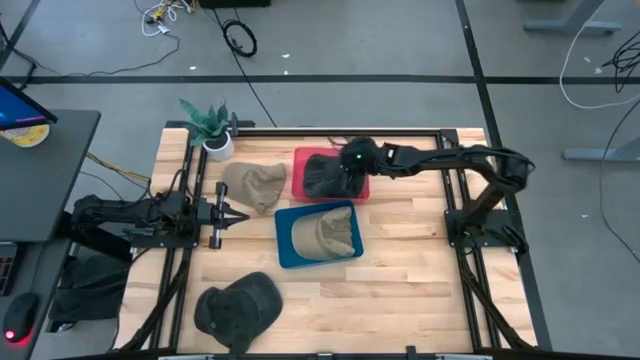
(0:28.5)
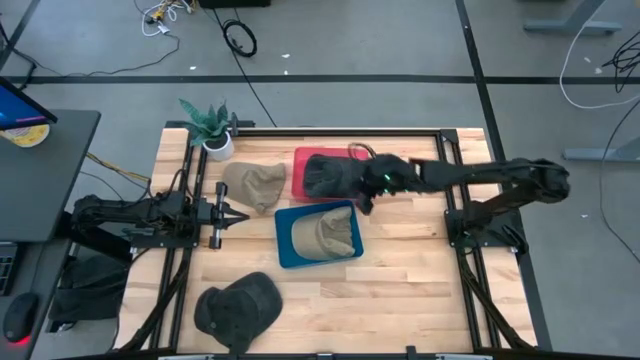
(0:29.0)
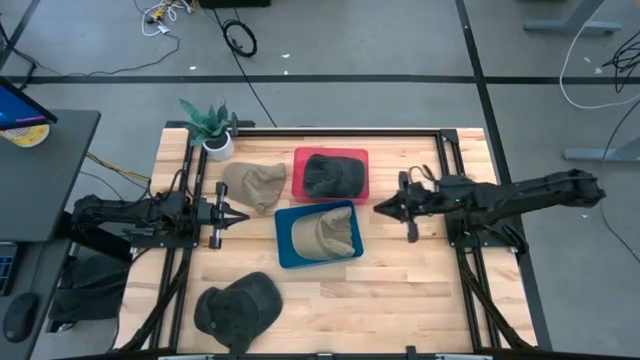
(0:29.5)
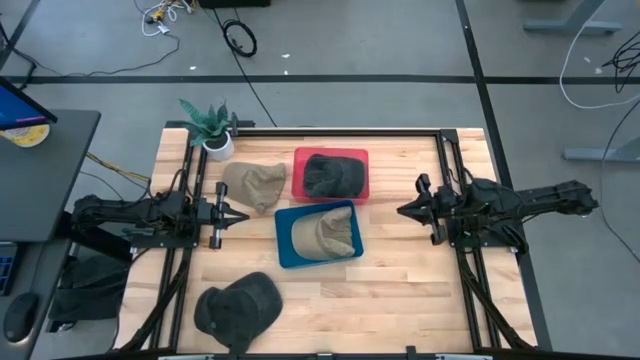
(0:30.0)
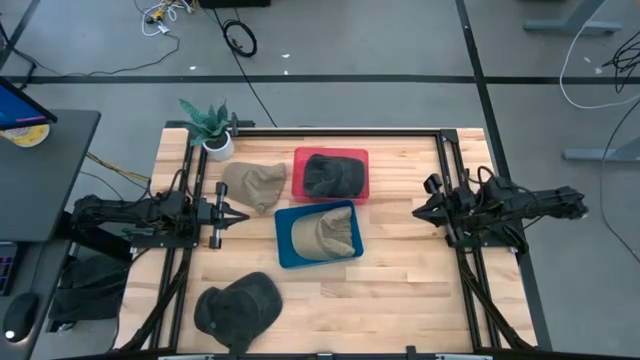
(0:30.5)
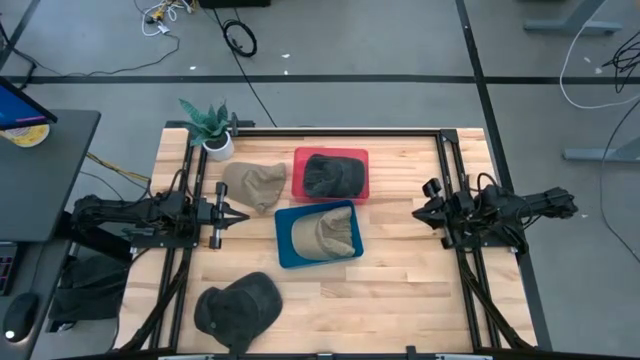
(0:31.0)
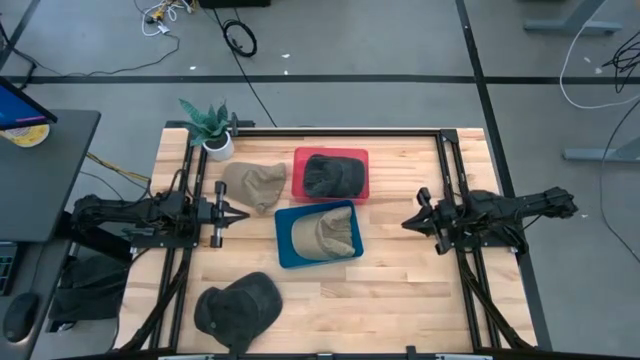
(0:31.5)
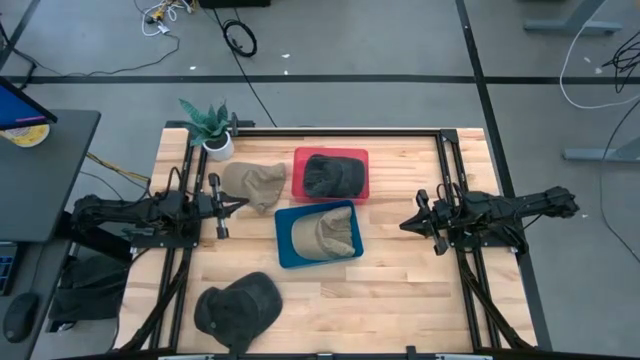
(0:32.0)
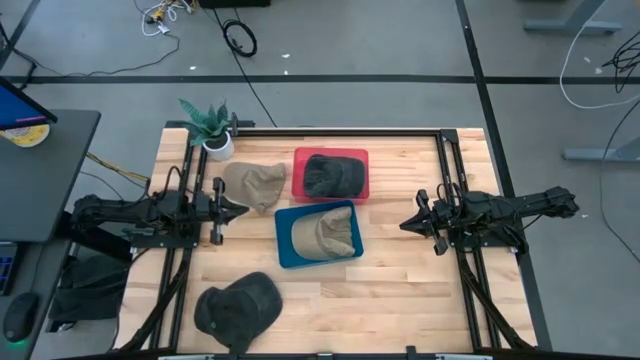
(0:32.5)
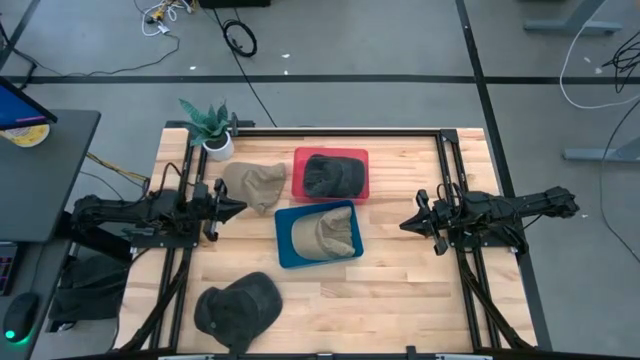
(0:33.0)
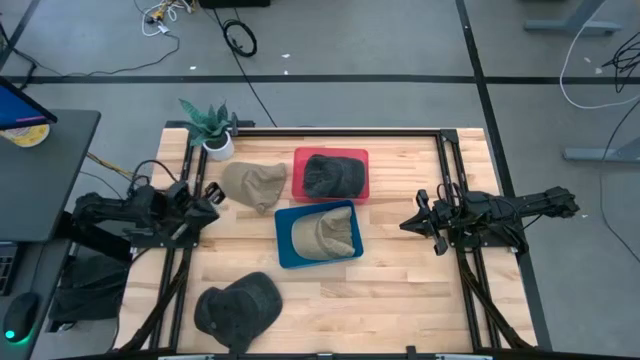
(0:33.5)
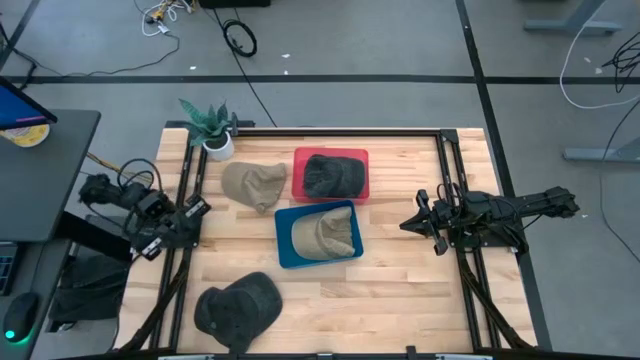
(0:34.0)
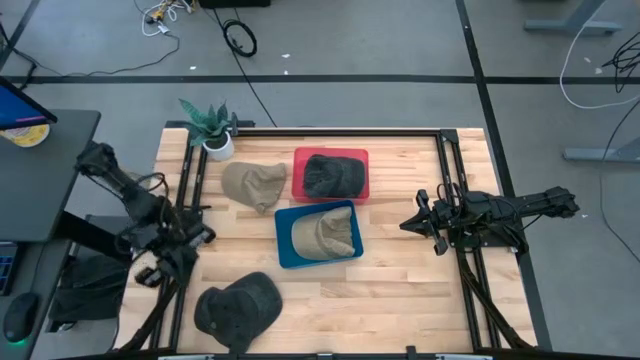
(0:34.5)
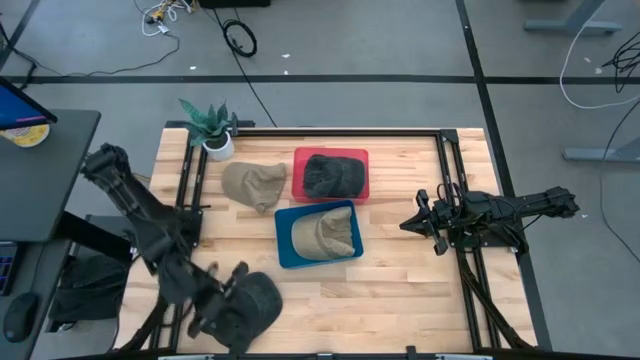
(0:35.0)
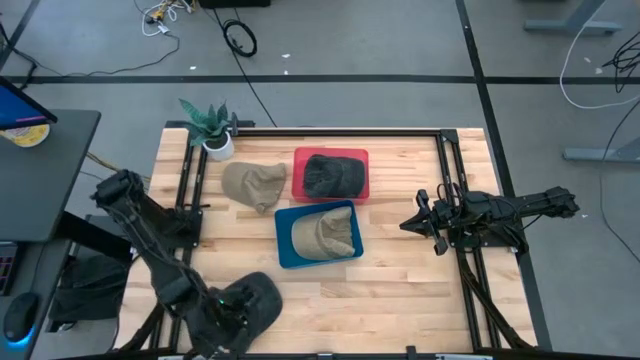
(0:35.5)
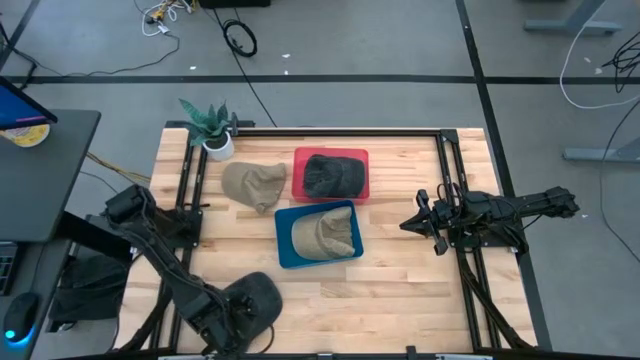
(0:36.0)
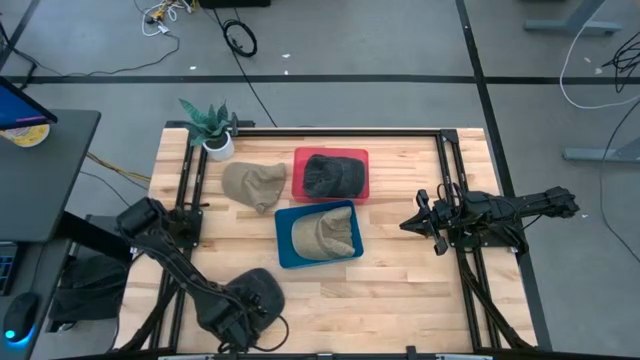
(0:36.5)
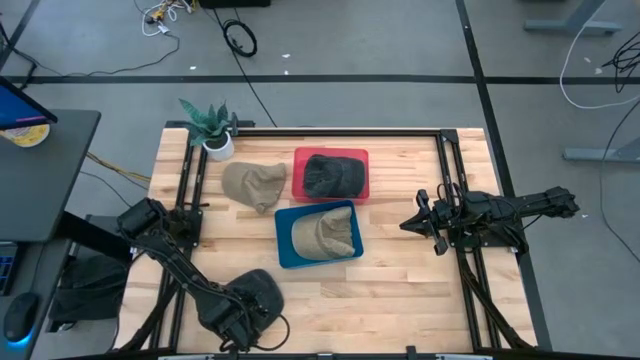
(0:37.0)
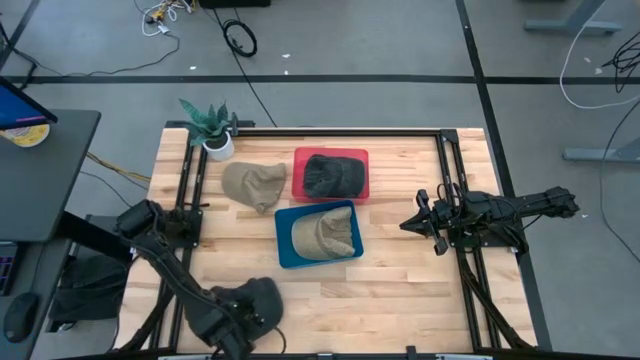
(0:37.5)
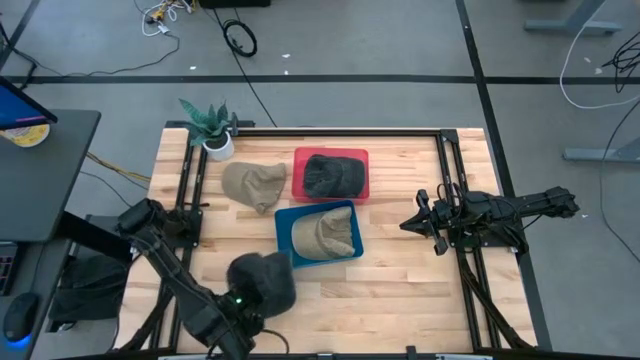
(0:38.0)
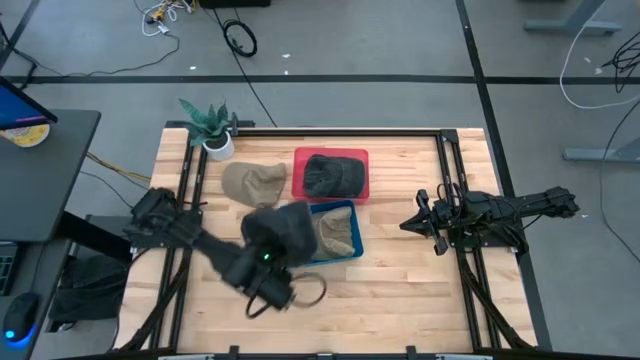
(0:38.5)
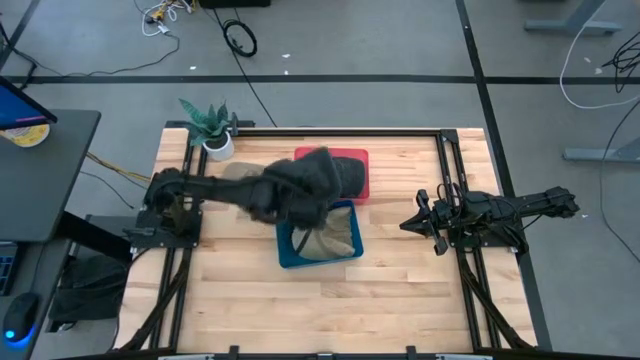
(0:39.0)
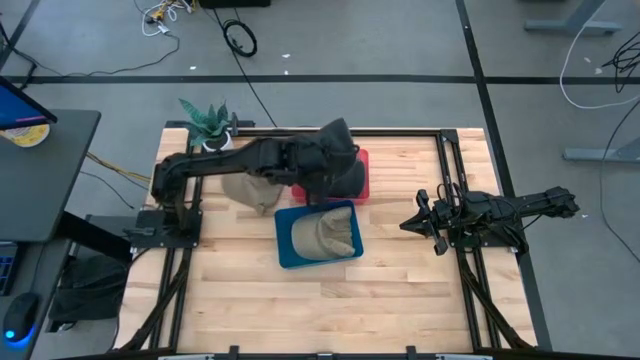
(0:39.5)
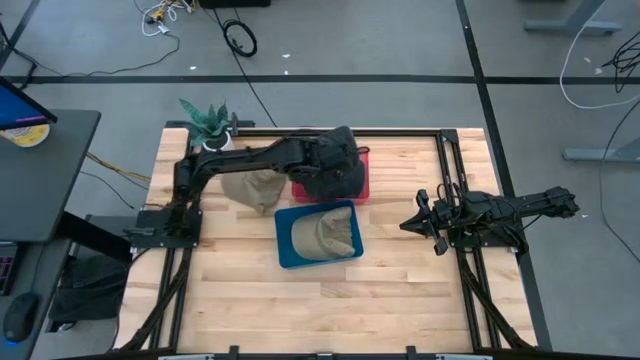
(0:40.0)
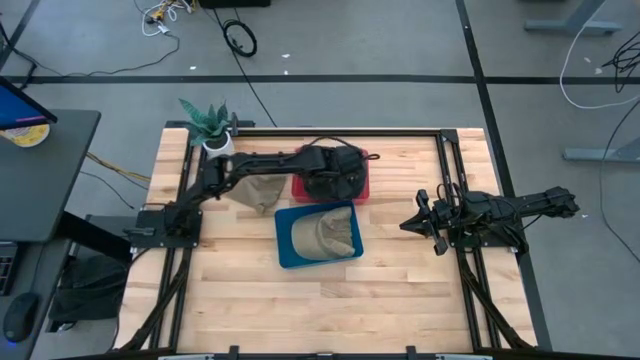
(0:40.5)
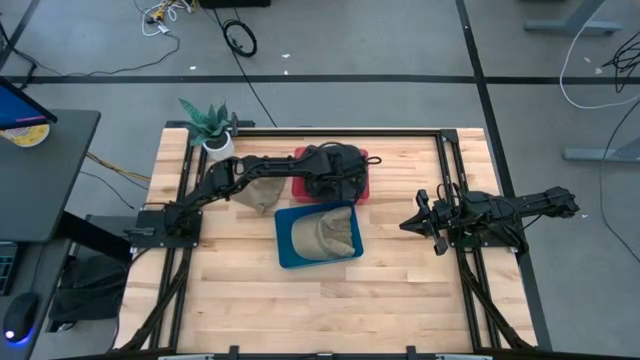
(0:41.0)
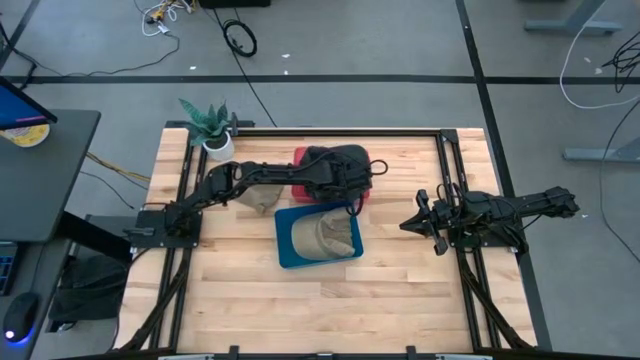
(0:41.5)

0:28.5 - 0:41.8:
Task: Pick & Place hat
Put the black cap into the red bin

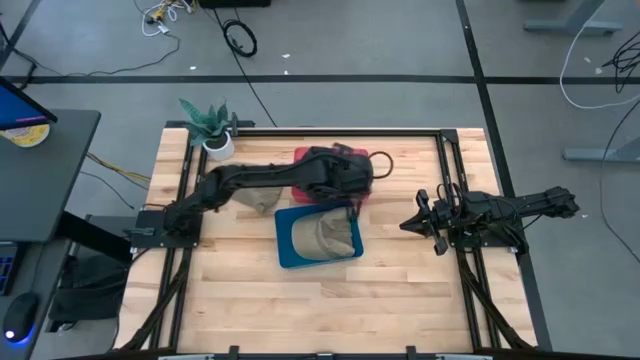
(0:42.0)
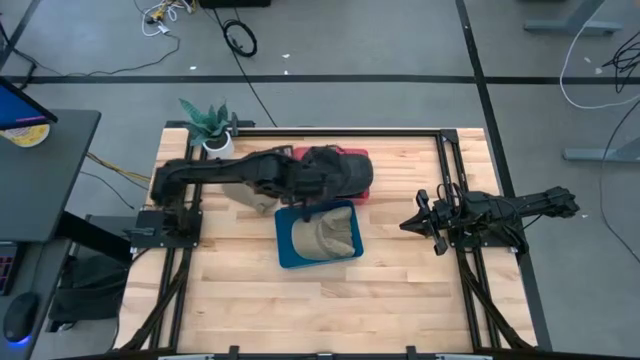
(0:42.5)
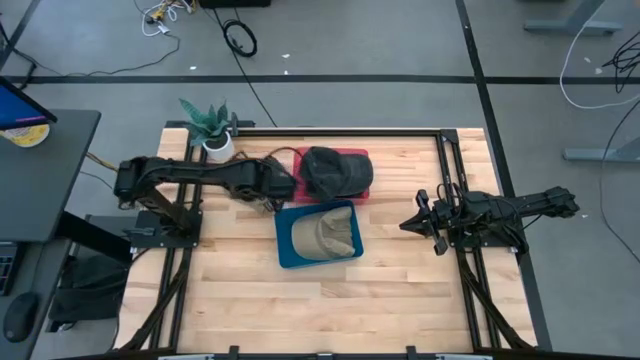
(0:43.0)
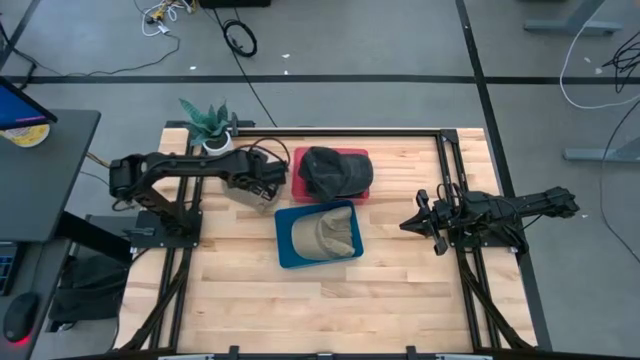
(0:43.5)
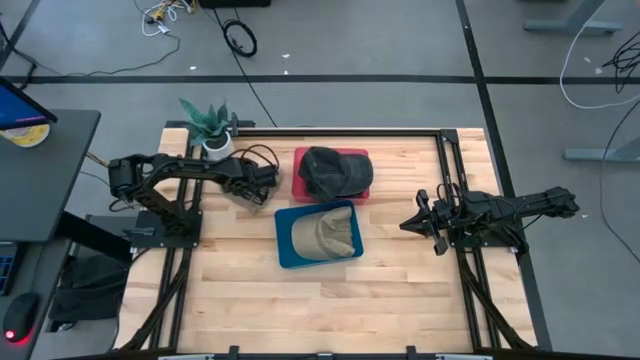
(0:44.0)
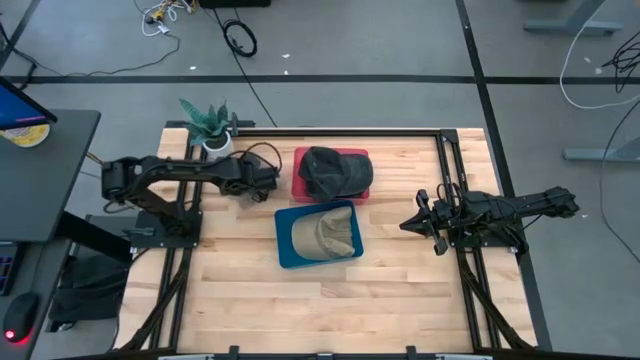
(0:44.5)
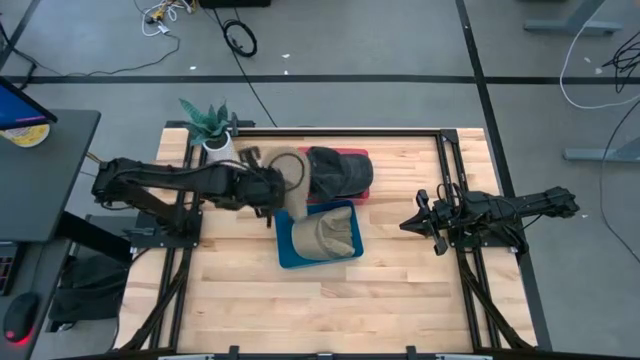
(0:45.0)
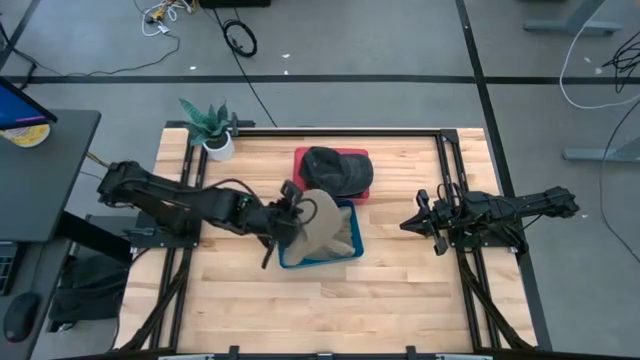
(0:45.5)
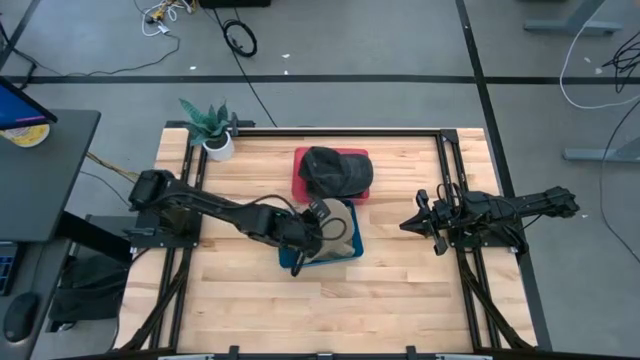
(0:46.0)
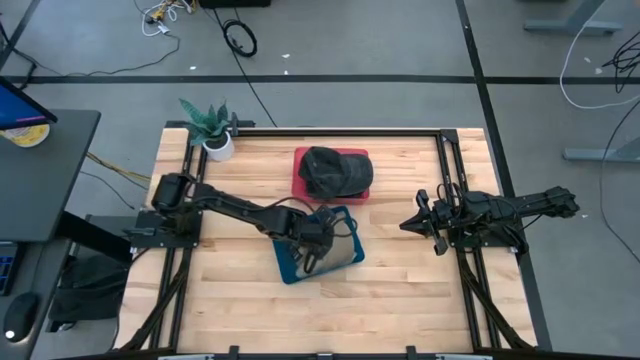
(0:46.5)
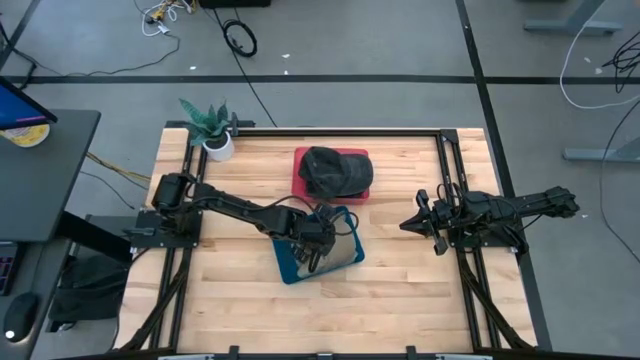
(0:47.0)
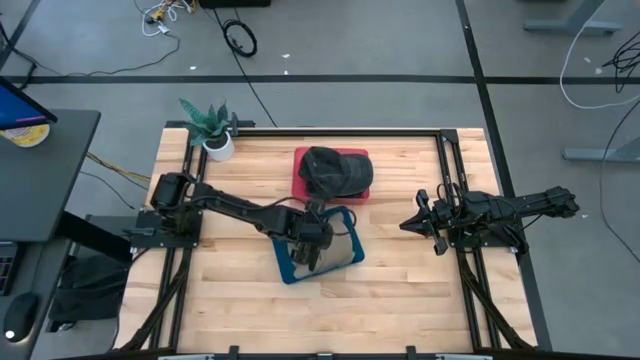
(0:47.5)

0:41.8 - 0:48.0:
Put the brown cap into the blue bin

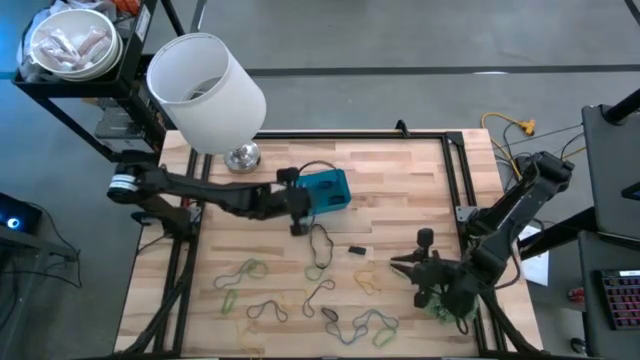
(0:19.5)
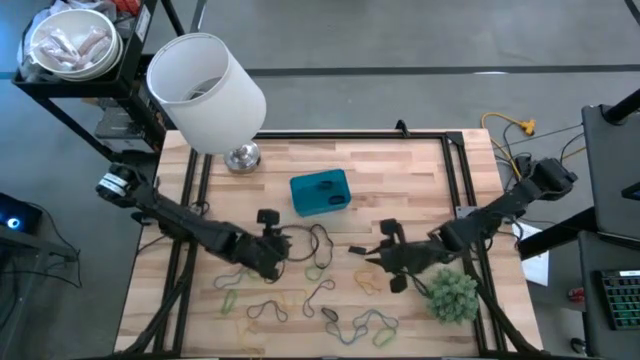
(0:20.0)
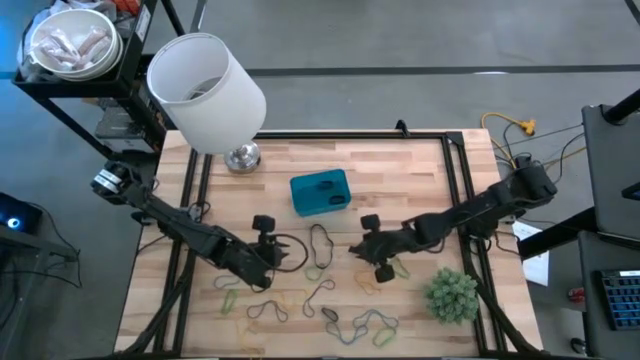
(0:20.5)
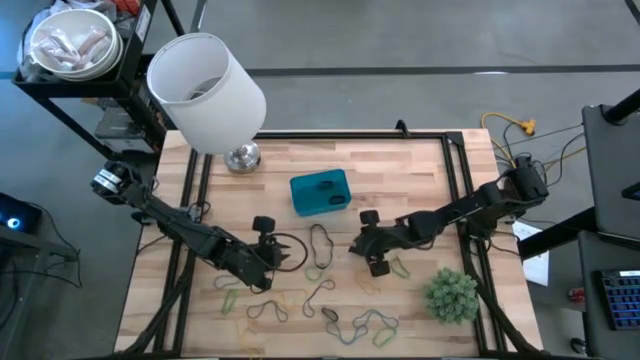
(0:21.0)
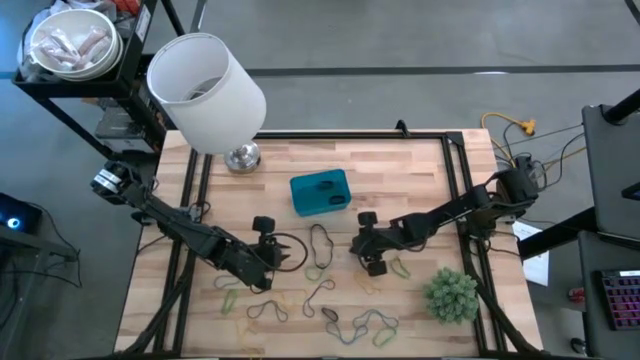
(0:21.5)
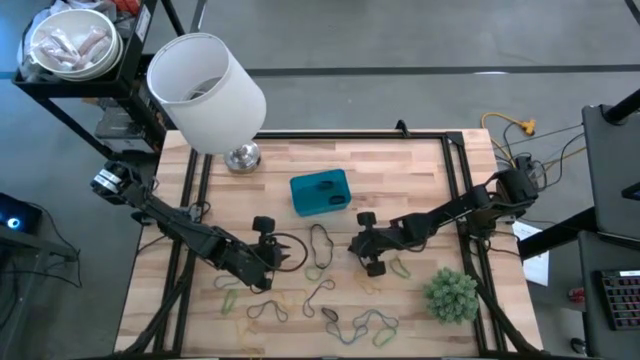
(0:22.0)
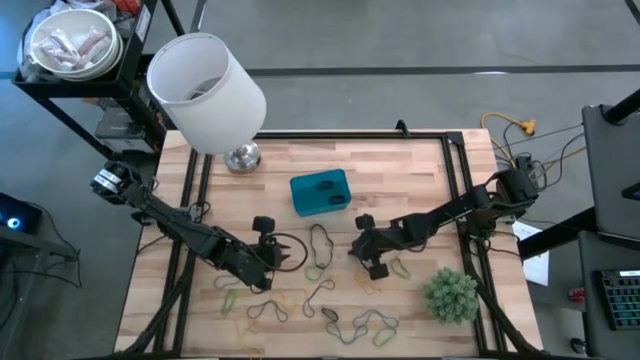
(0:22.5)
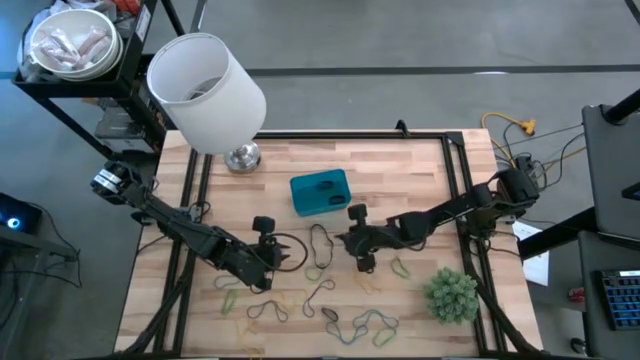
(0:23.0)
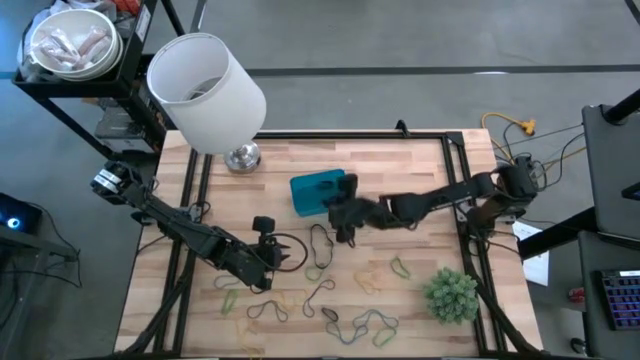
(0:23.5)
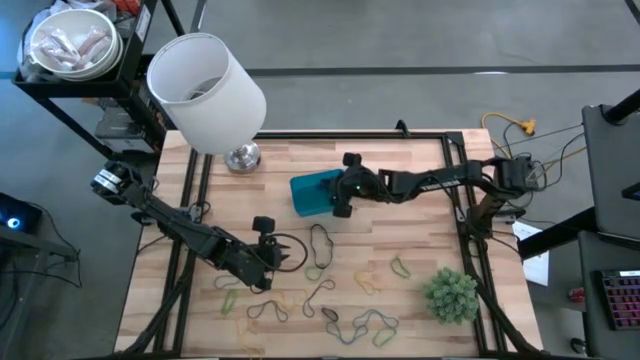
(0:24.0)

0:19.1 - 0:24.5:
Task: Pick and place rubber bands into bin
Put the black rubber band into the blue bin
